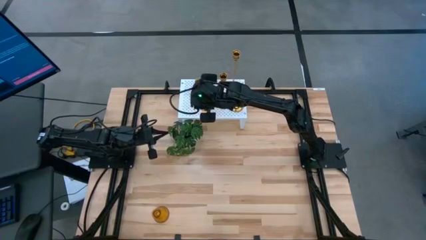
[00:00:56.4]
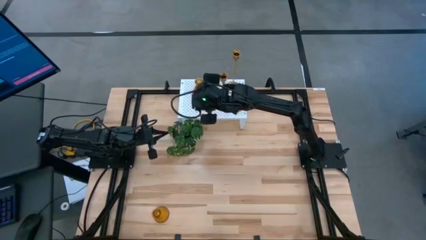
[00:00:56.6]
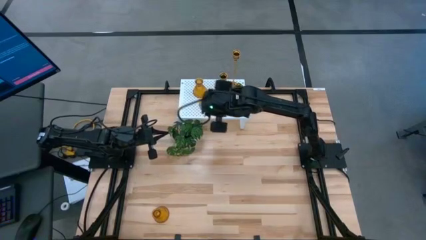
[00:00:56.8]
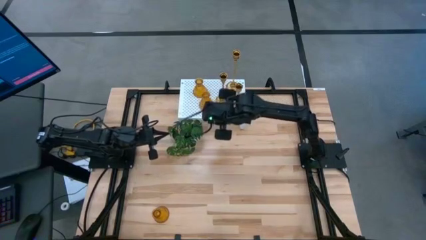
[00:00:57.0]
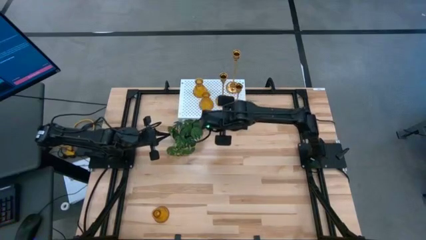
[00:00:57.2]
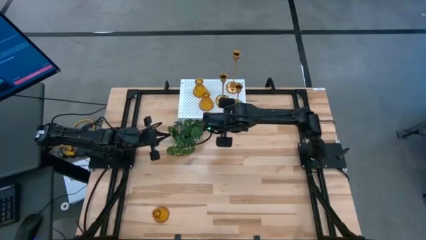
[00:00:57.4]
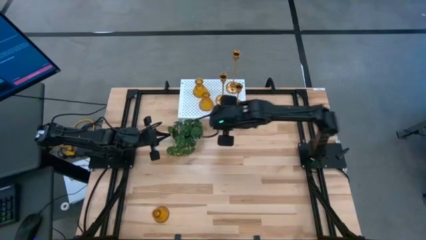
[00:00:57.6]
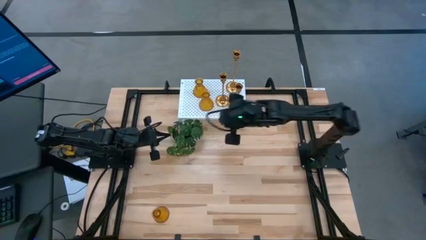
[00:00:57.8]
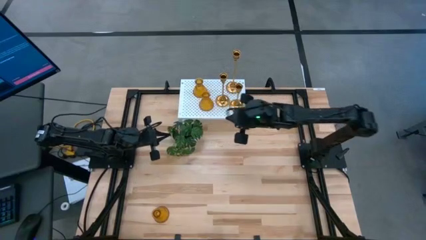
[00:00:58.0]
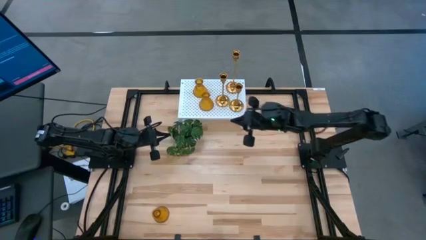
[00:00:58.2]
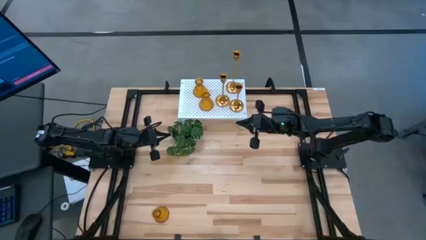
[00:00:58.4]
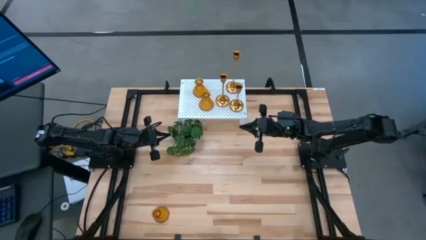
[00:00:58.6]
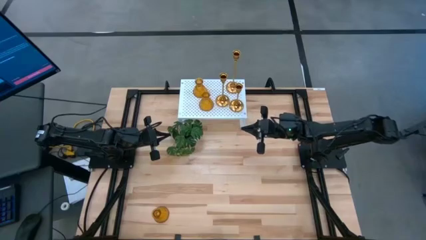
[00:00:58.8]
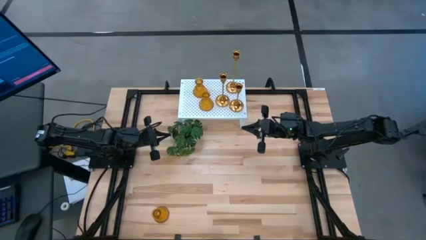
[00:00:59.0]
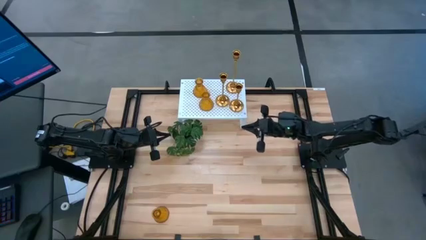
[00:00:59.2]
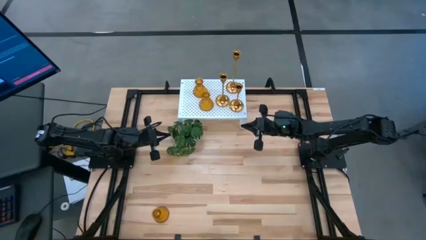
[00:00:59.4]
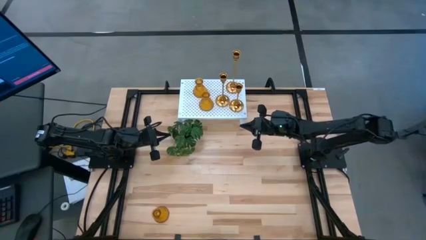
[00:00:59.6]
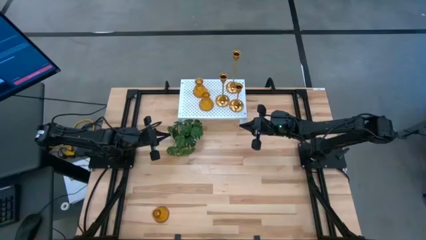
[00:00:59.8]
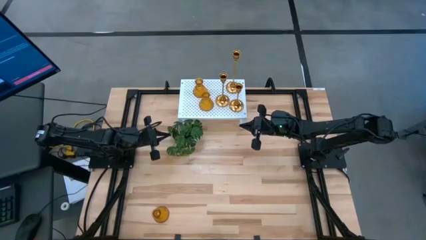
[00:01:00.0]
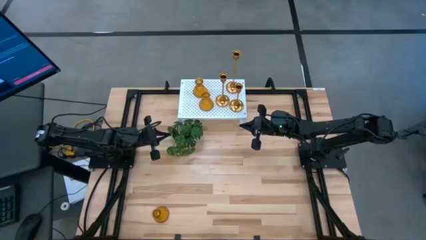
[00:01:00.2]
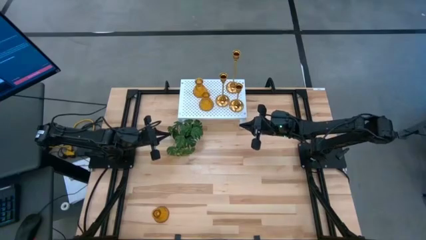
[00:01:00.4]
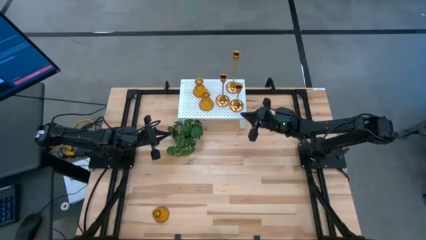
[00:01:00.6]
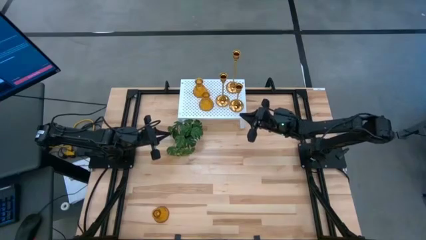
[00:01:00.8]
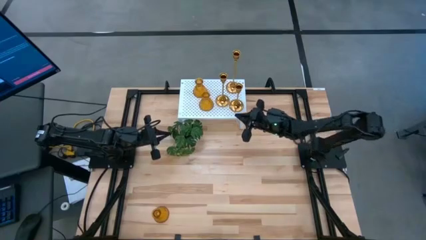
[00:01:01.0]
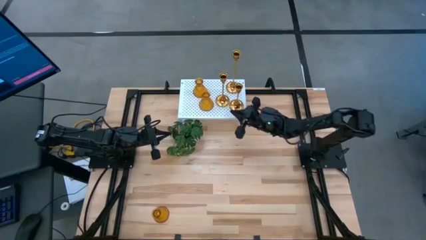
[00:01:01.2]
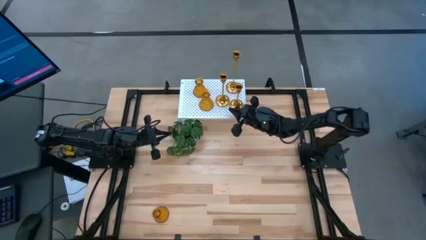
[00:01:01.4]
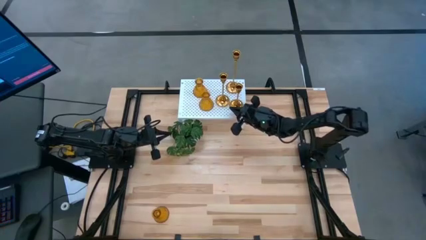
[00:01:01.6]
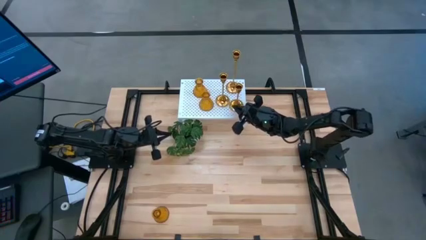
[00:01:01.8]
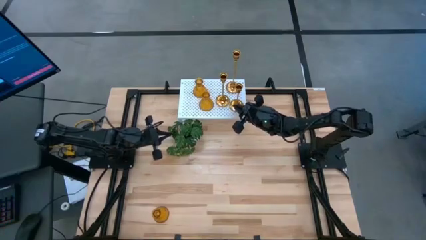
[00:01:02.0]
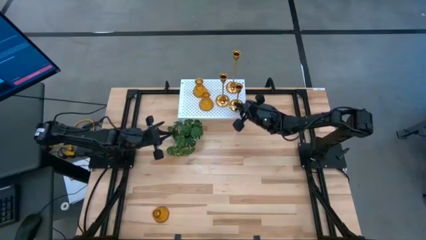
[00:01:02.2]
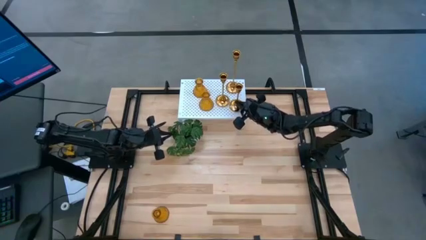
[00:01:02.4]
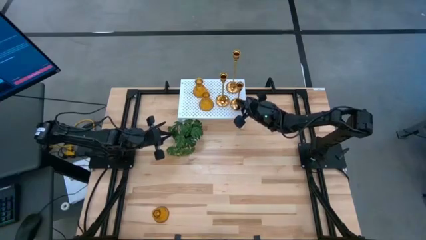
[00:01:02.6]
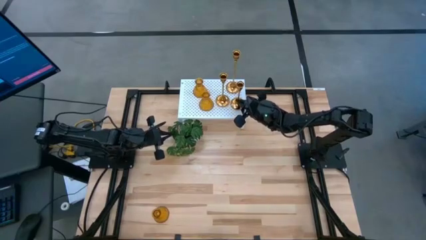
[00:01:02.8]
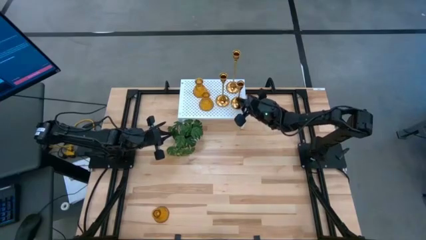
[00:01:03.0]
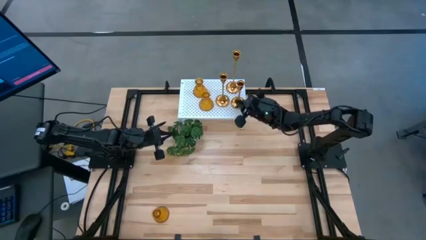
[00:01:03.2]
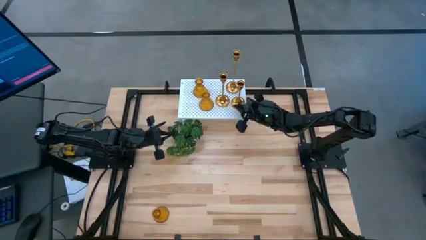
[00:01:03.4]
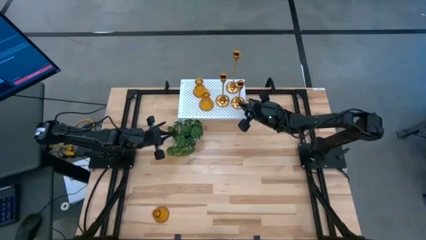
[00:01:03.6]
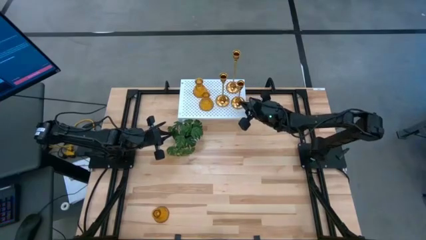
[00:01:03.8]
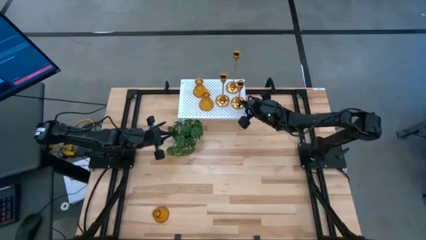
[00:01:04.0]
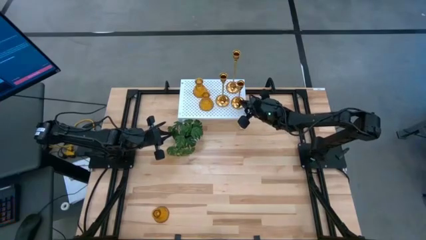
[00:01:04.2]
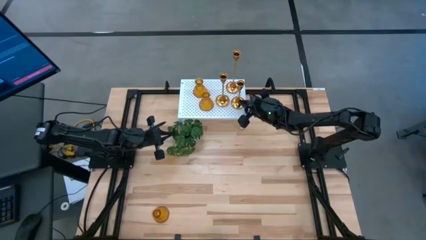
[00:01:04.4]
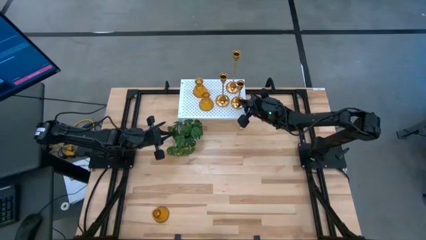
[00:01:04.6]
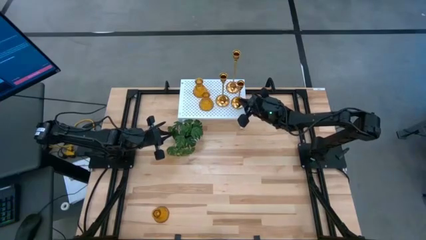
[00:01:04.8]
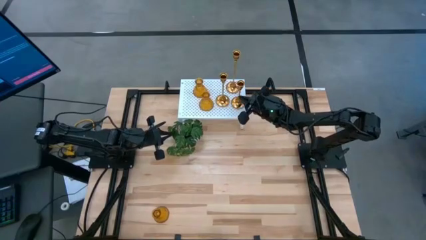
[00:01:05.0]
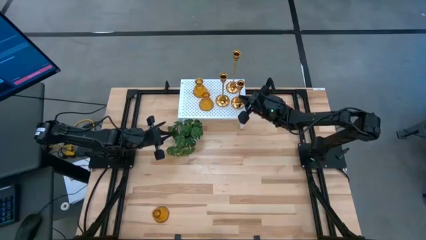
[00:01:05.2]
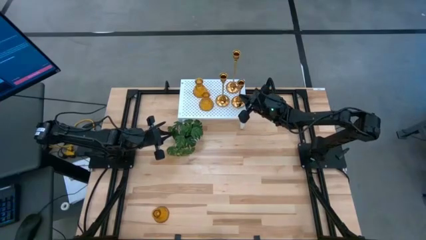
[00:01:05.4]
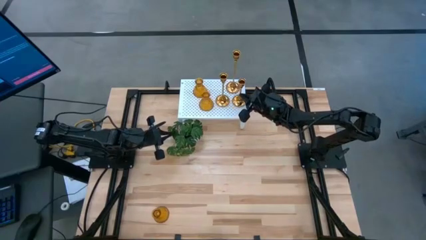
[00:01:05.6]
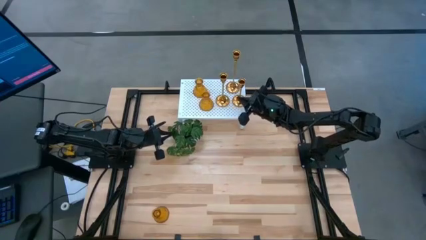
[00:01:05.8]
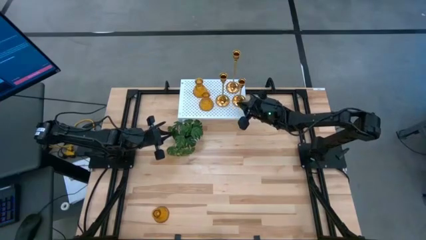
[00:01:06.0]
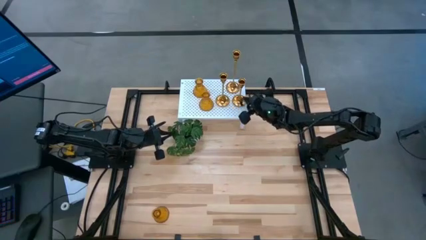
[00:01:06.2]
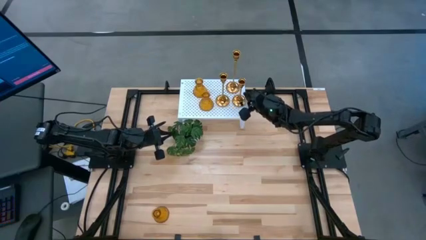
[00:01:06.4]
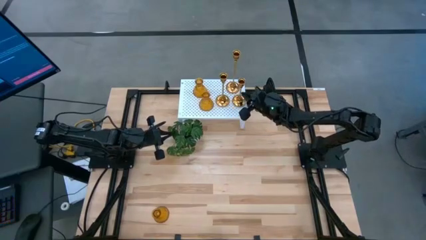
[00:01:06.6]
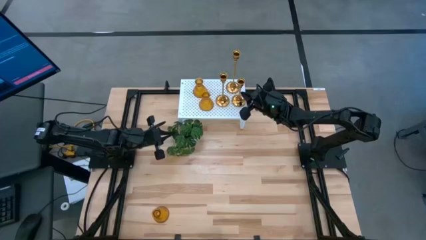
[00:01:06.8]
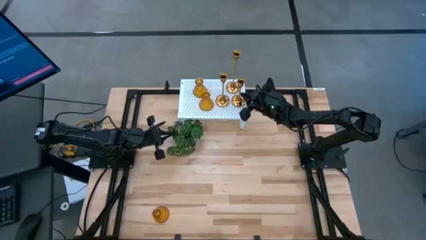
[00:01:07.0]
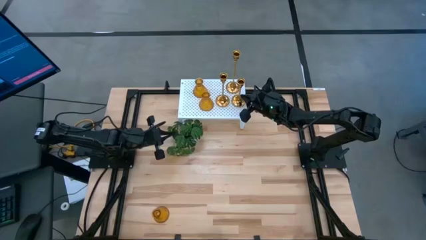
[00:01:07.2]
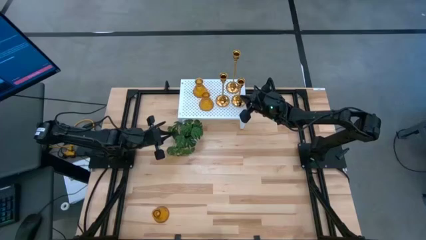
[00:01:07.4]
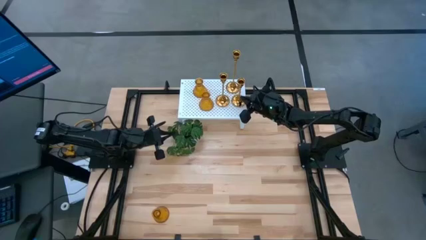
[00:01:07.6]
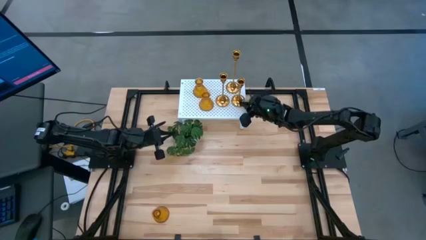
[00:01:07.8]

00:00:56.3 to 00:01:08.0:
Task: Pick & Place candle stick holders
Adjust the bottom gold candle holder on the shelf

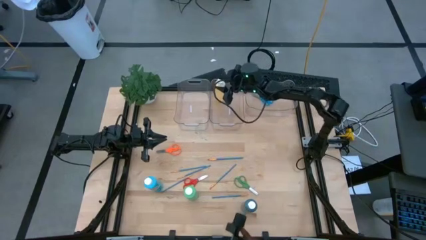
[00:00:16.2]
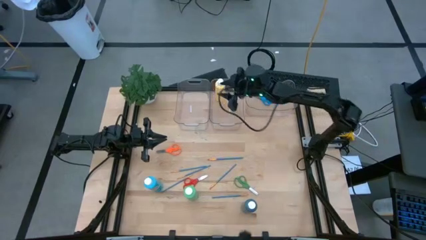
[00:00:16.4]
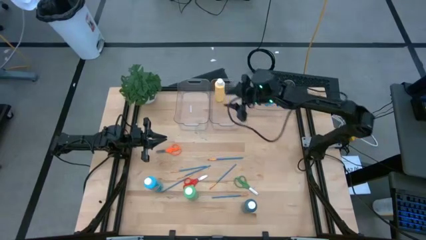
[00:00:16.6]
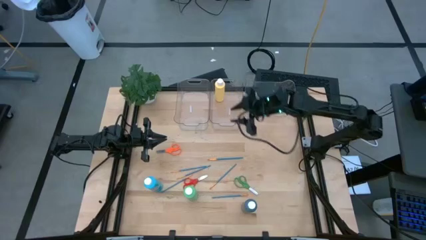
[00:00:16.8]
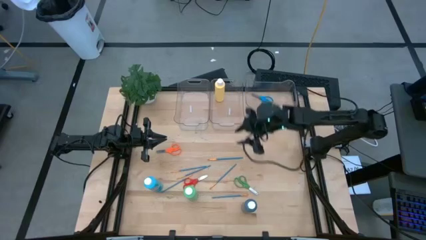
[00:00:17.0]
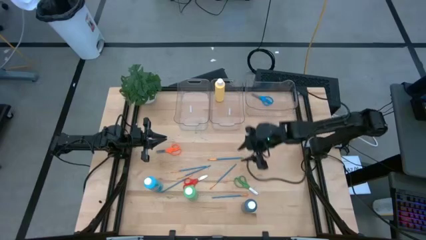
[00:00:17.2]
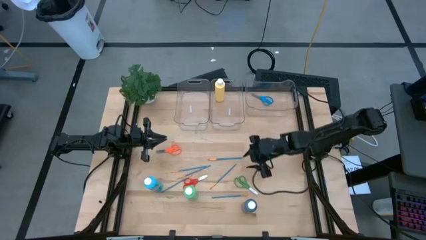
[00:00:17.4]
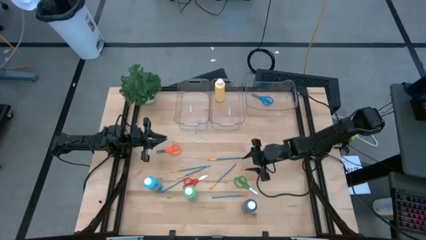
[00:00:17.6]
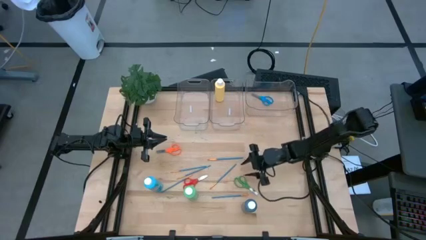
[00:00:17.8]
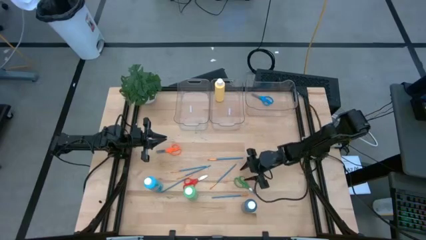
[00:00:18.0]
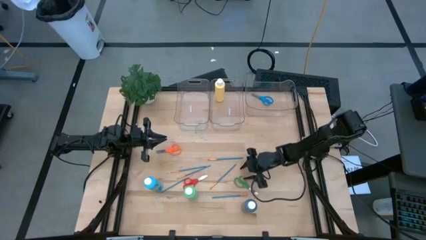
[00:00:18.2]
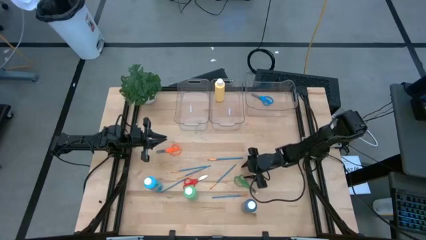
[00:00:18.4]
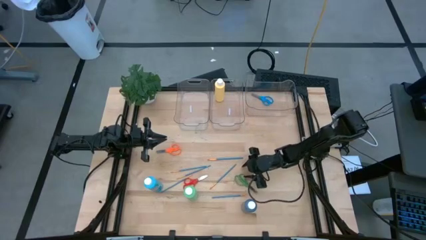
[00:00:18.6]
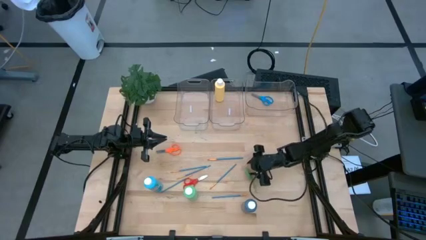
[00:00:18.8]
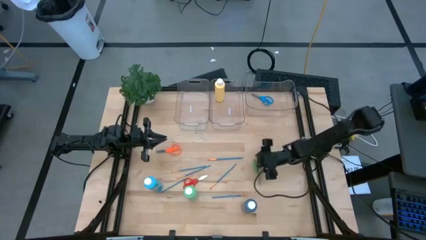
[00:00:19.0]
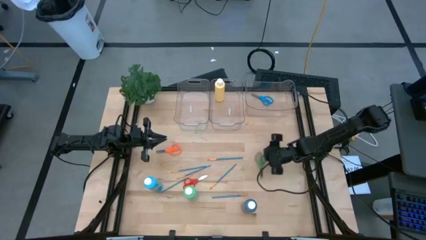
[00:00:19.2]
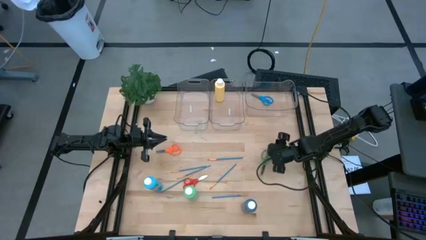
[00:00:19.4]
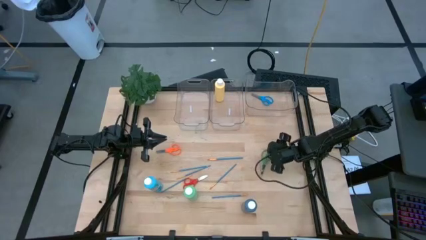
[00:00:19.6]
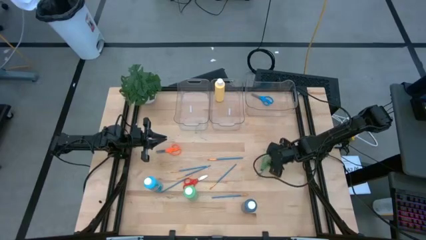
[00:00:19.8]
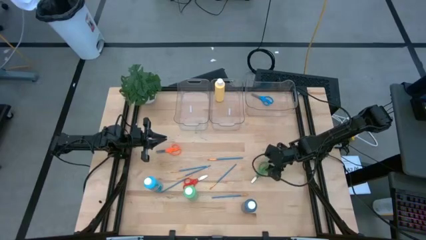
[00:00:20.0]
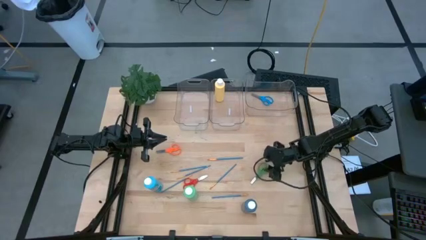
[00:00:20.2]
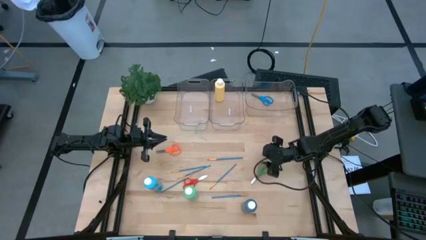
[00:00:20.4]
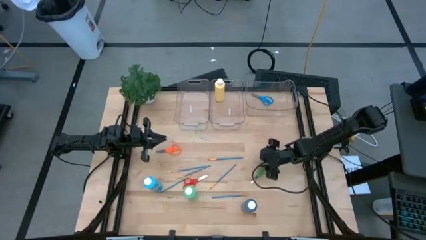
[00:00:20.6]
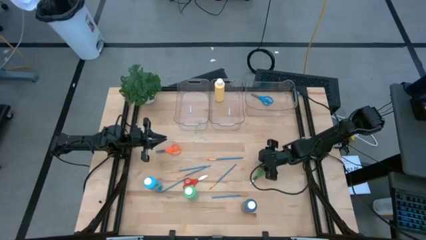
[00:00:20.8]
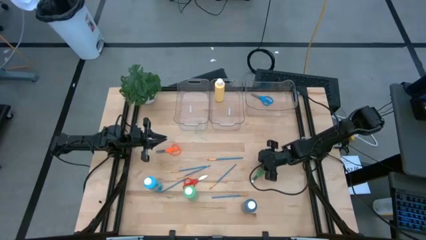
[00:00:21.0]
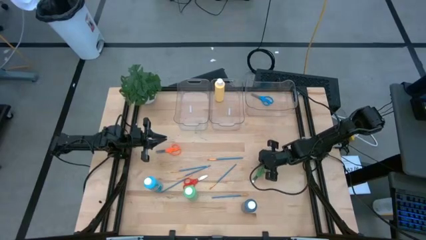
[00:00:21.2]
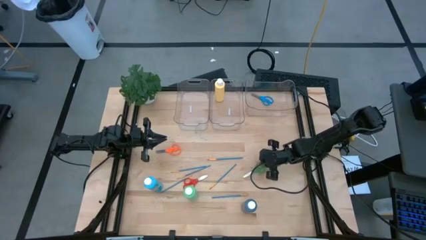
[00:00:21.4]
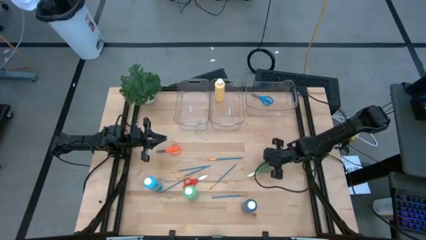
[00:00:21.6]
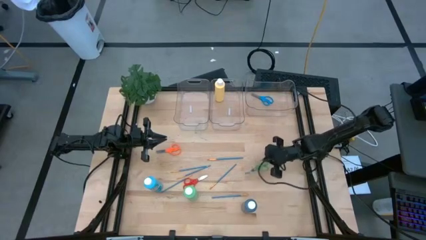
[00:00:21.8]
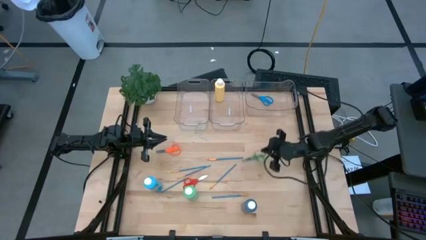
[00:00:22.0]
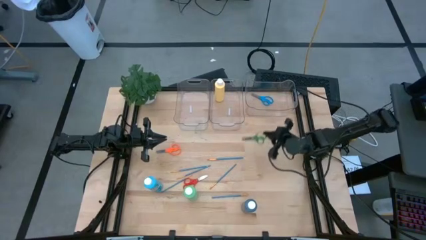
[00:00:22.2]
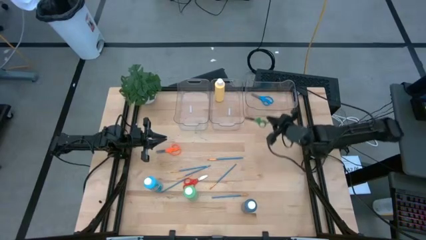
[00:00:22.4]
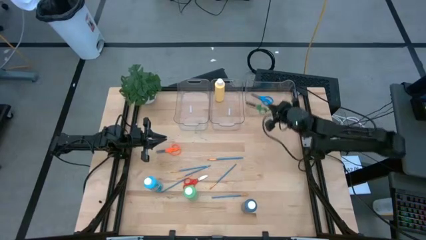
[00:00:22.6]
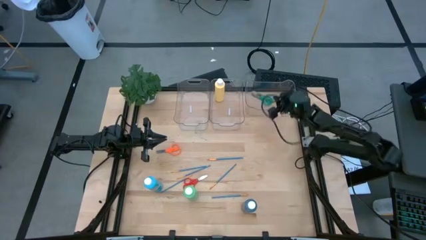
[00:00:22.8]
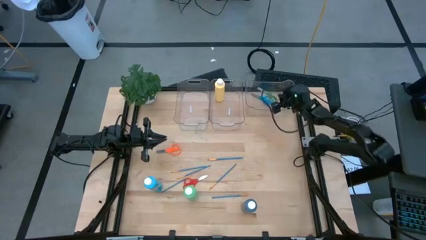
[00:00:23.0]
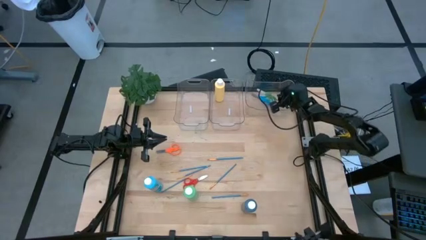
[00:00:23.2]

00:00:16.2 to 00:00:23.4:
Task: Pick & Place Paint Supplies
Put the green scissors into the right transparent bin
